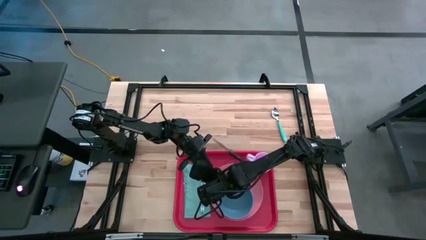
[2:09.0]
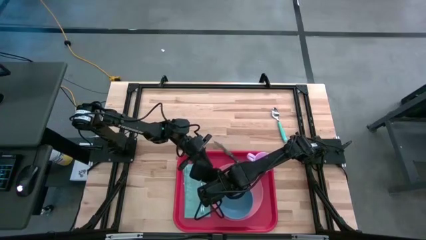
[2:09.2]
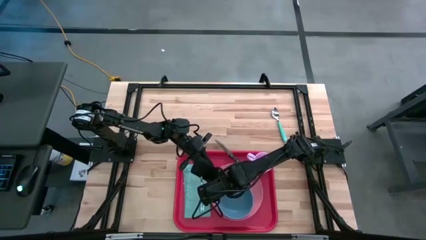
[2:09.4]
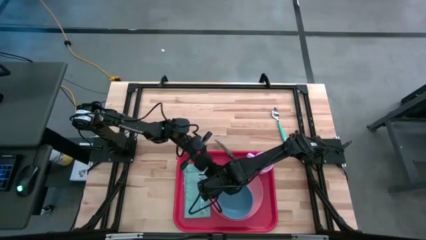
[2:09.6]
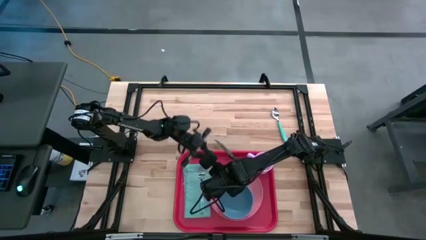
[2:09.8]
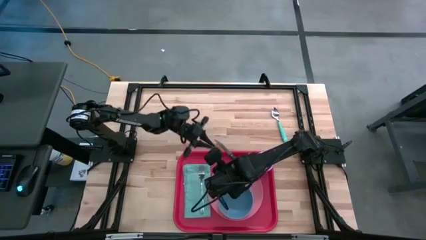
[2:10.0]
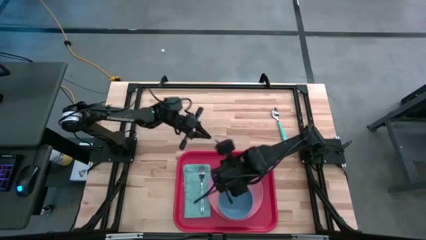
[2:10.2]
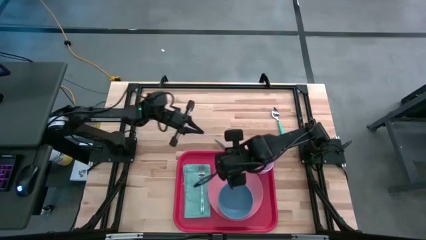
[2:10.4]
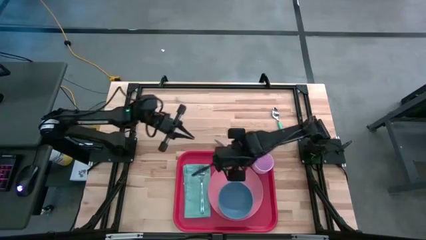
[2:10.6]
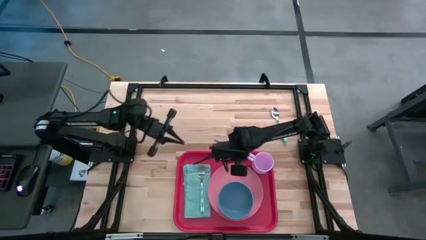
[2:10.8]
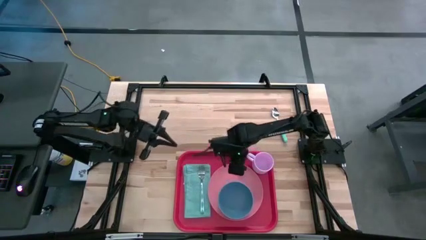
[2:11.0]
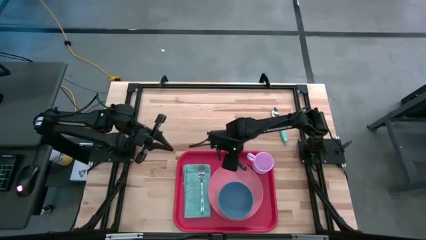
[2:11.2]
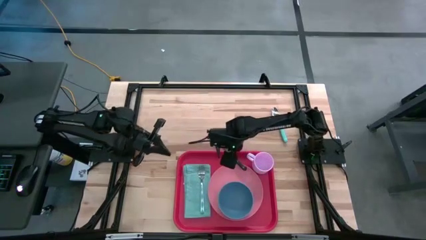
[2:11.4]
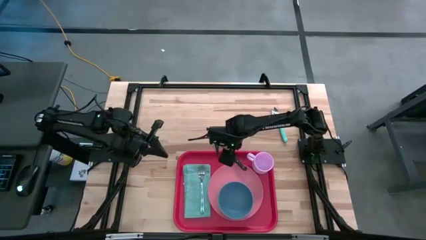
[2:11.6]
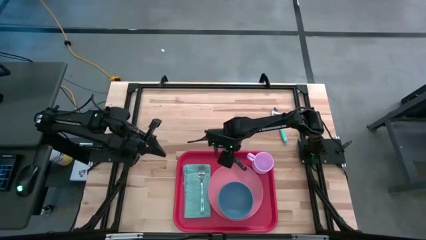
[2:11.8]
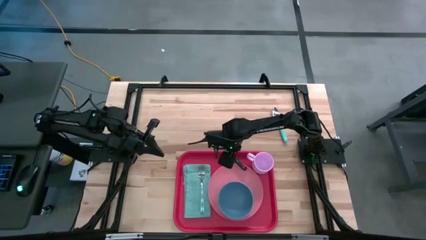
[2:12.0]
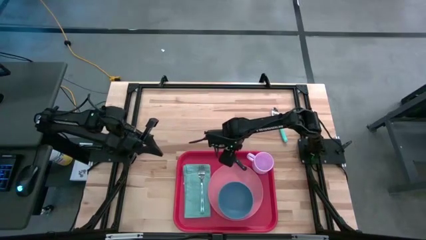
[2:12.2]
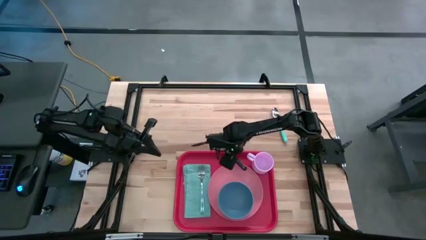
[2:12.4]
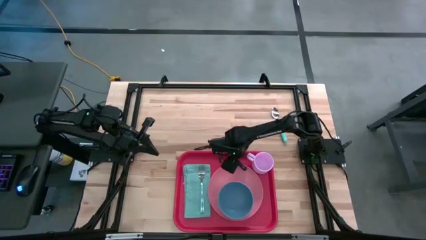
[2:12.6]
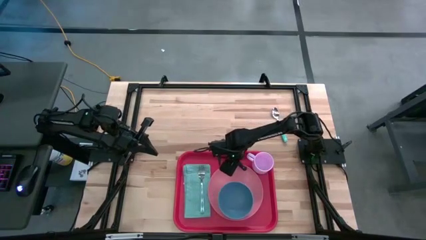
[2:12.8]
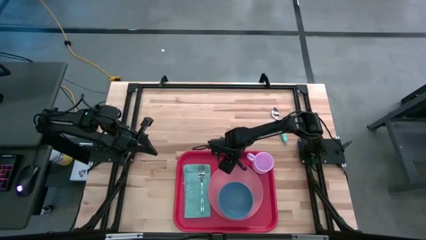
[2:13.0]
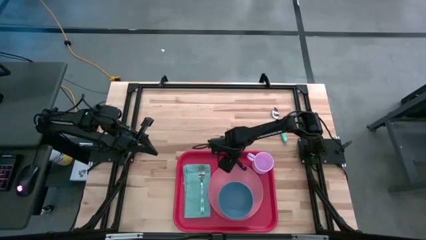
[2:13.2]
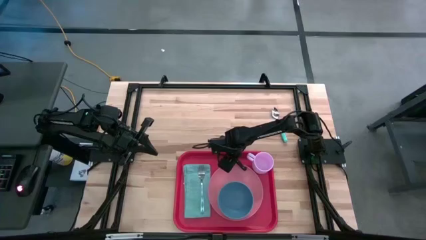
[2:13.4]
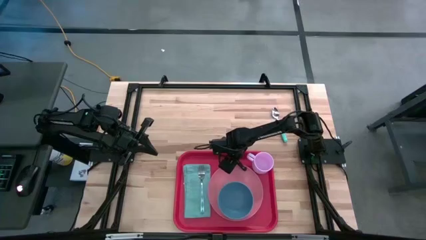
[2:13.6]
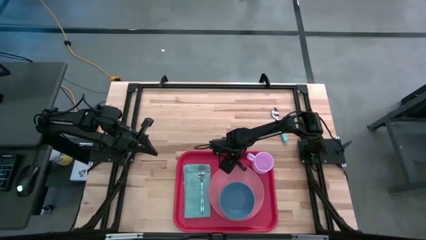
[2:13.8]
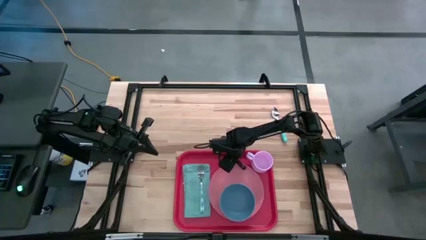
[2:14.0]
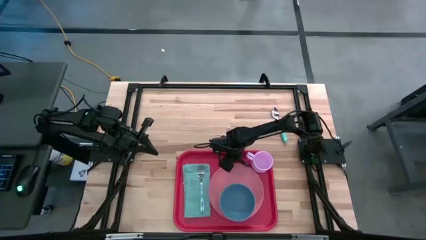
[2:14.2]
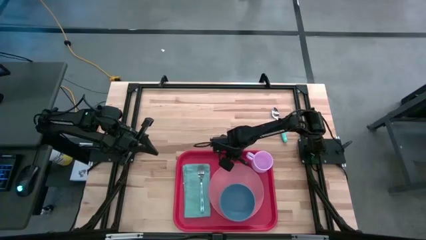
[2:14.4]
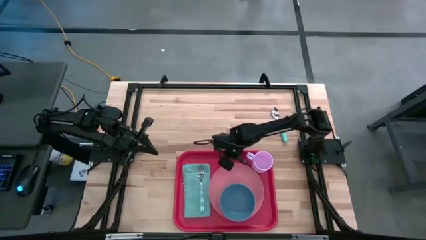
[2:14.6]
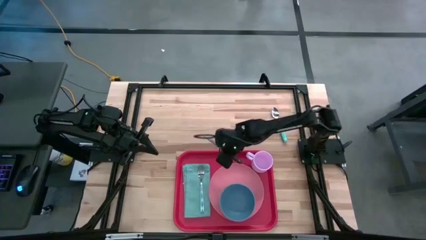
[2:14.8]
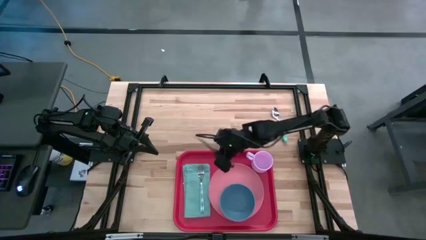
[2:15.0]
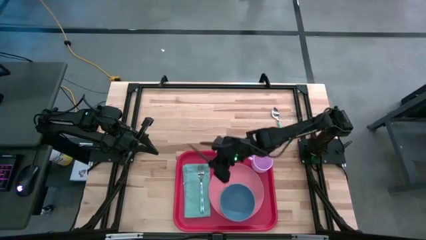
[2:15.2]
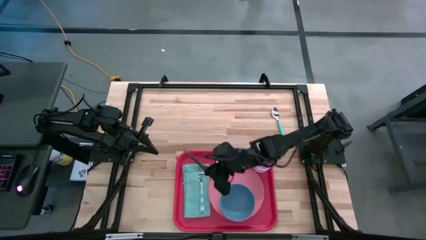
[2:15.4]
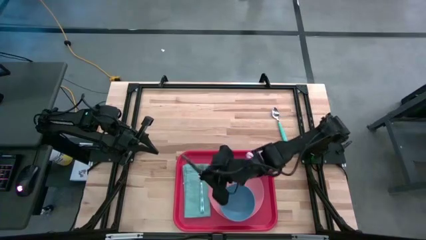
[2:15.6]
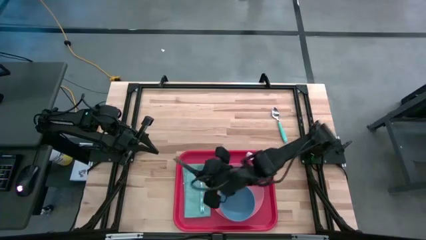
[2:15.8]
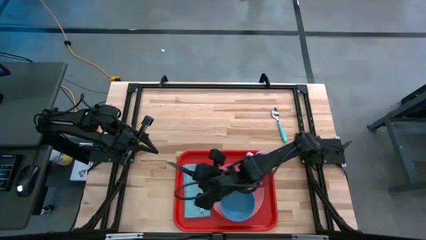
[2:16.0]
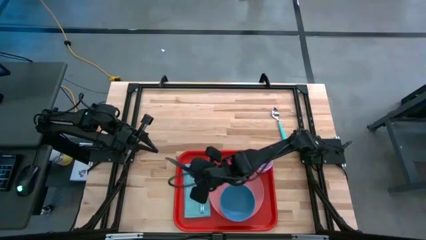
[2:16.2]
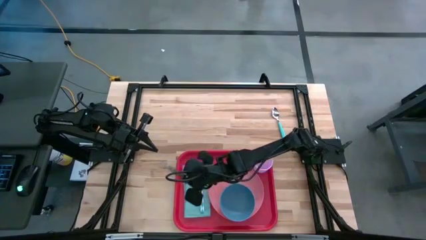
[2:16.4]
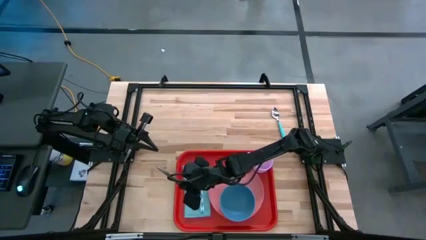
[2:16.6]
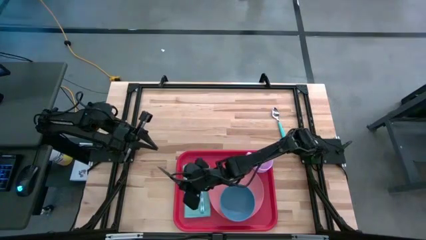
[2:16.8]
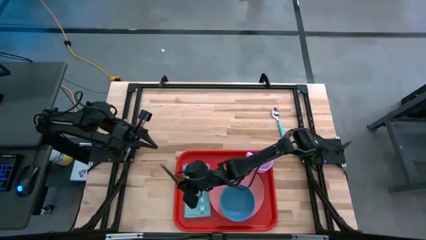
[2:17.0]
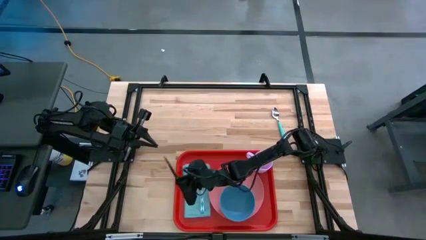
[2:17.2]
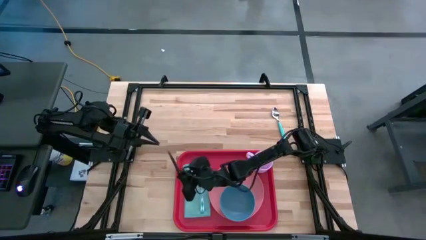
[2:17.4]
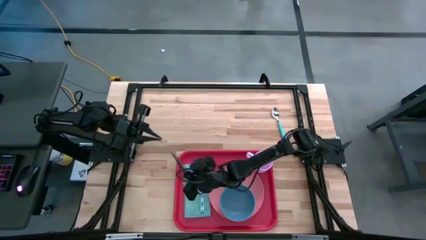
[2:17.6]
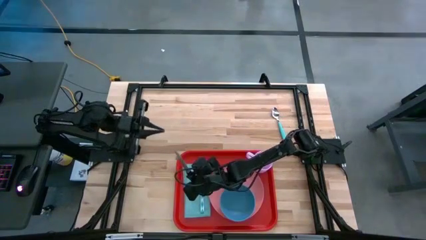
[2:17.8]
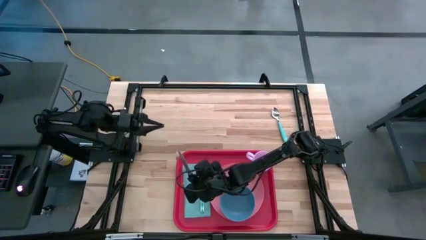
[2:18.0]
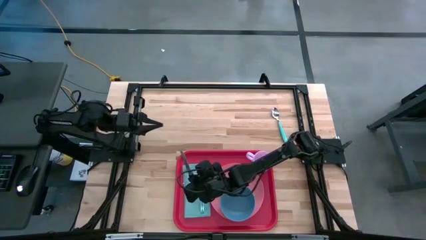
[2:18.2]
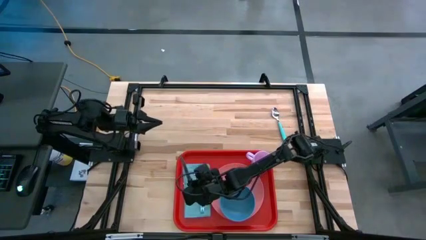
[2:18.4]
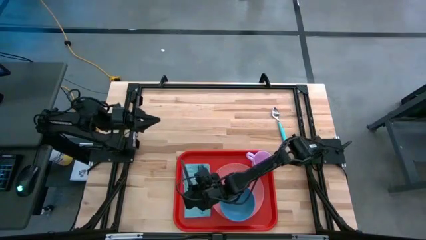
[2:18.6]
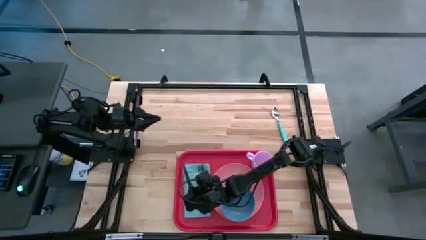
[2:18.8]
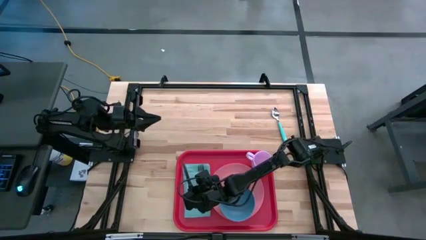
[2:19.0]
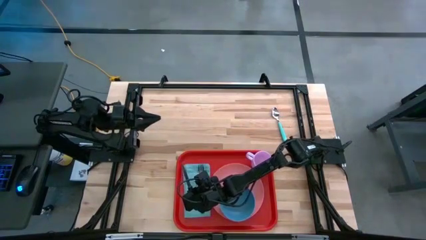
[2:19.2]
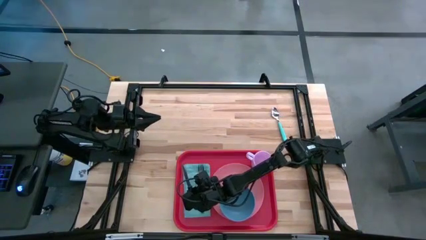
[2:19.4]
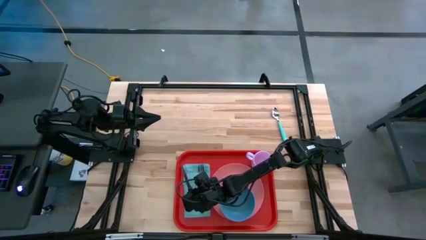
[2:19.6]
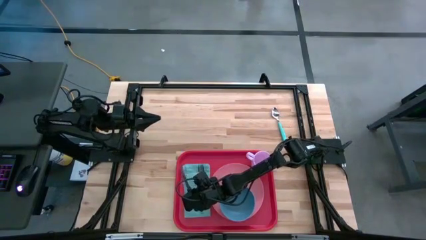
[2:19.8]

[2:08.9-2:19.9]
Task: Set up tray
Put the black knife on the blue napkin

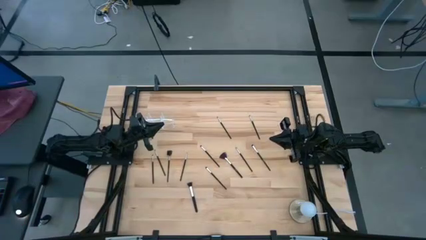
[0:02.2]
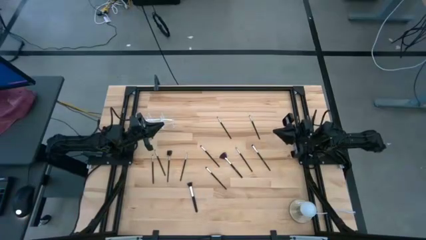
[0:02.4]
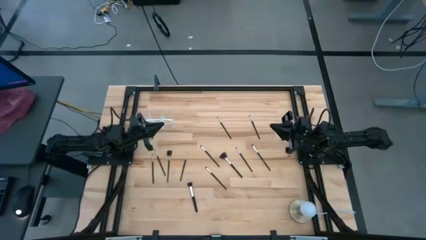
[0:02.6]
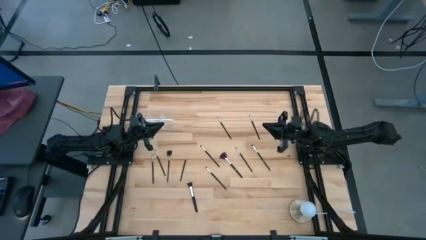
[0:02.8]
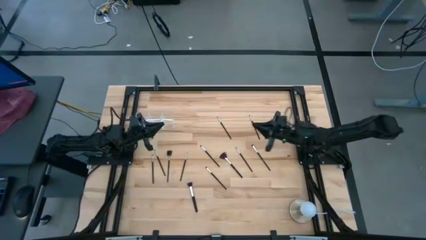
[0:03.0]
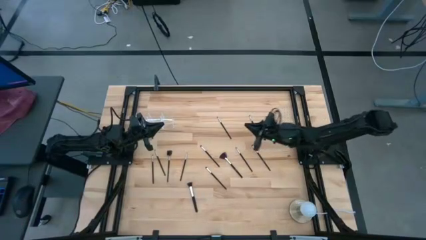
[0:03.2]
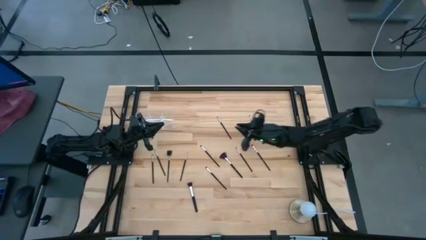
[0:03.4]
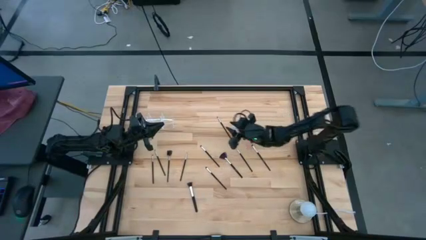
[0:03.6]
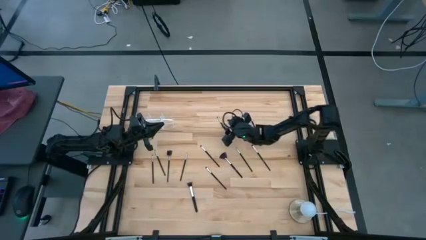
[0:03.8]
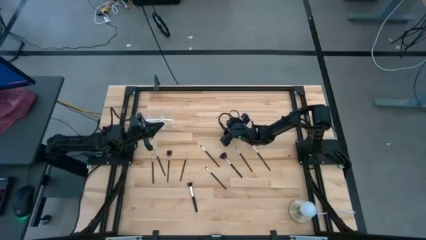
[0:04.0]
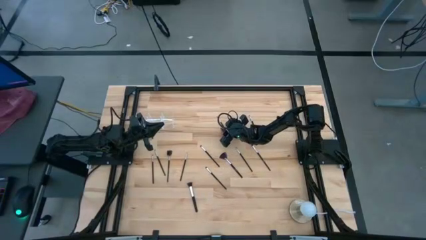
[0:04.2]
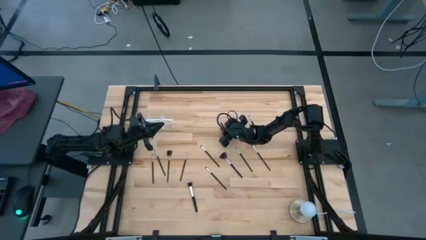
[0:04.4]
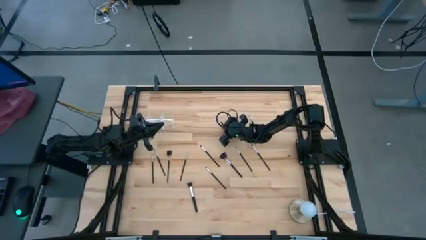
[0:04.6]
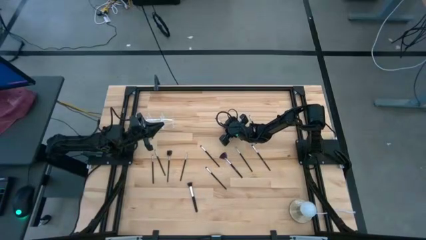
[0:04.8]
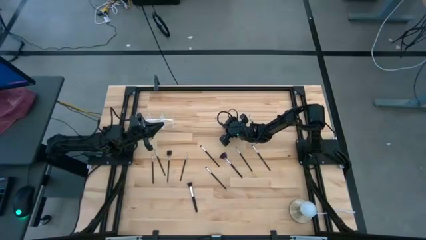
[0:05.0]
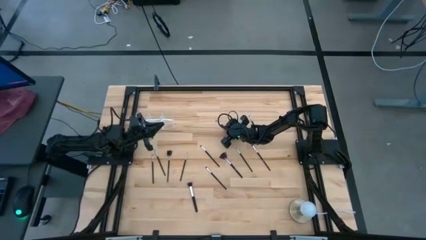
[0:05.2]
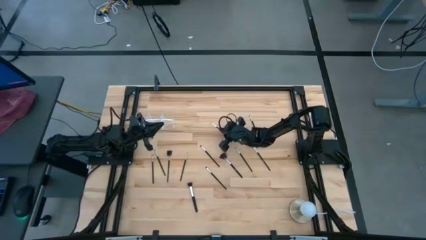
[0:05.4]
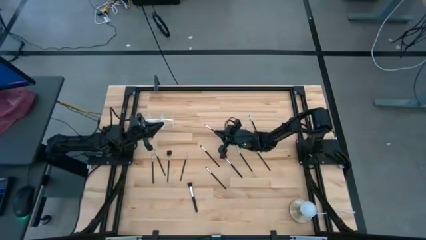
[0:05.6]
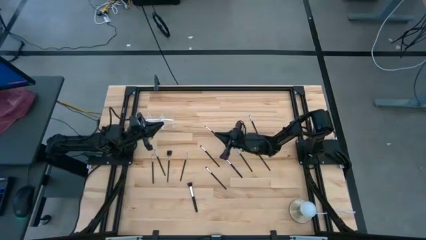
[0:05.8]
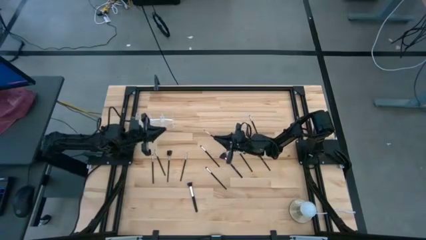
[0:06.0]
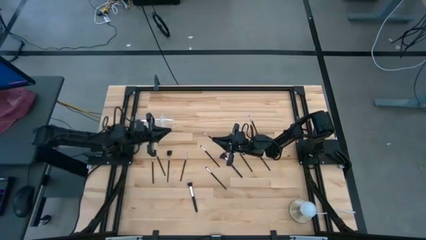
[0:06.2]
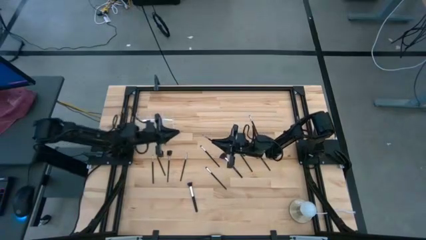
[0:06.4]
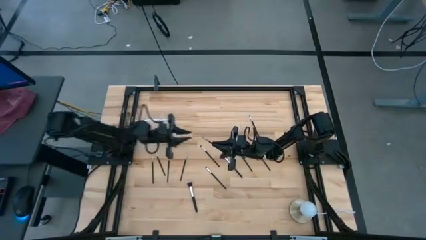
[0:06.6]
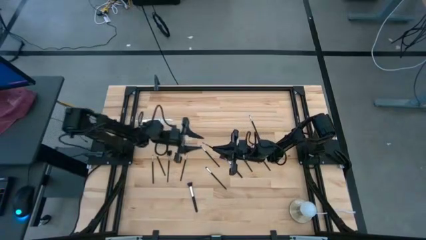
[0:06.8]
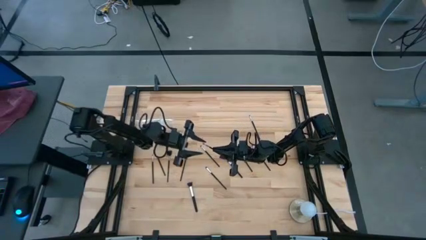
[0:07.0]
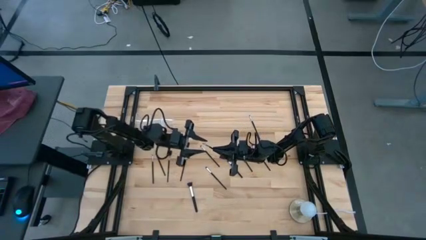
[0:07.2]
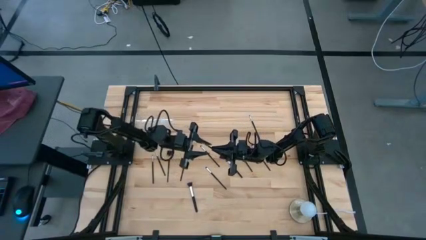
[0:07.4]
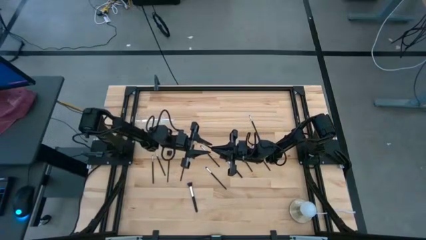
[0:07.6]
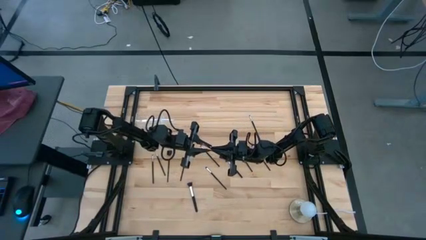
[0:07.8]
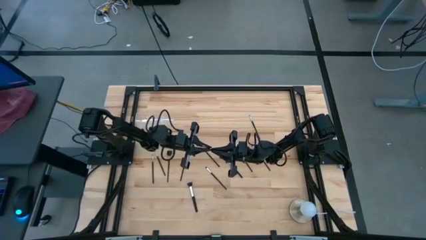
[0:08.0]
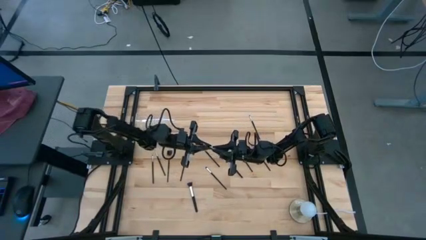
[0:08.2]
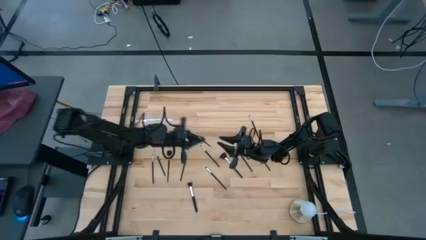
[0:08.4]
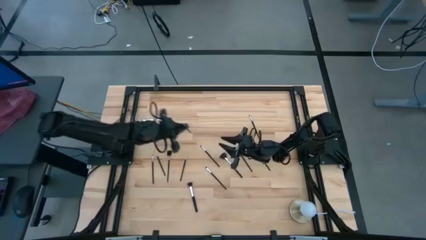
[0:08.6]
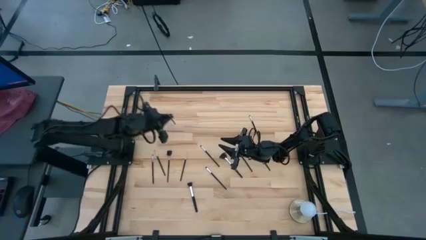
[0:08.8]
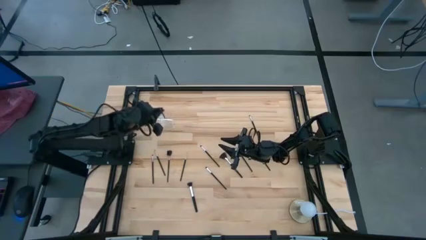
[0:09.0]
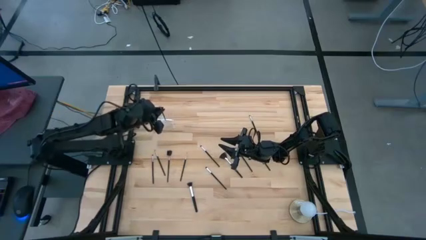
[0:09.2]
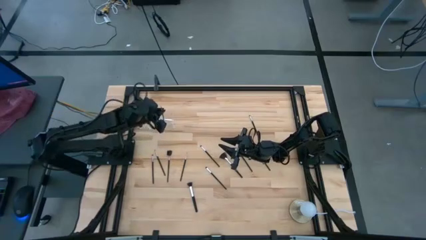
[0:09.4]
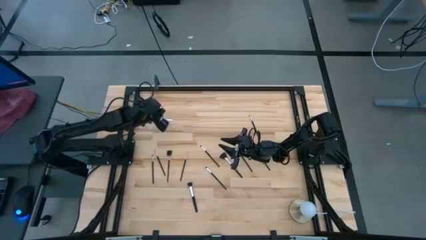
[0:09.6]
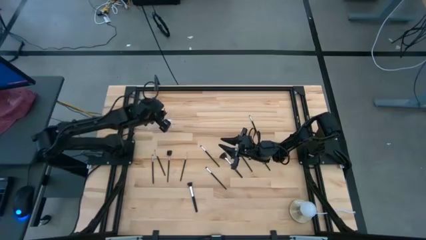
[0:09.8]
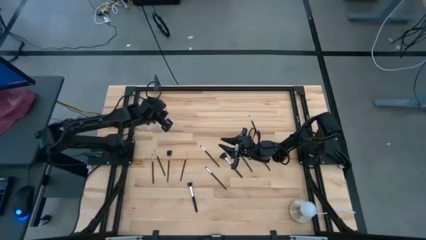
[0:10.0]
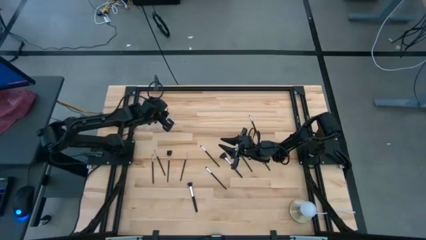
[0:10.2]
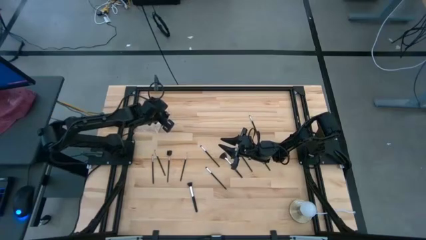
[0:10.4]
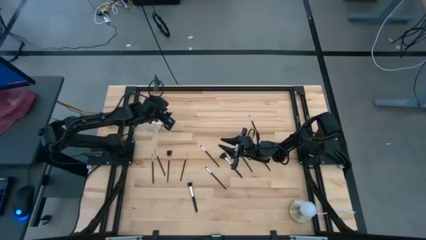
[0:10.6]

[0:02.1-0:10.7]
Task: Put items in baskets/containers
Put the eyeshadow brush into the transparent organizer
